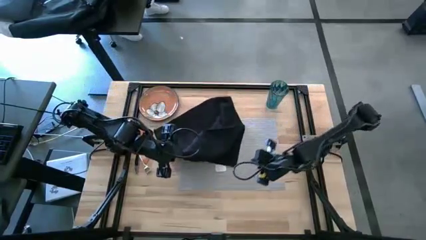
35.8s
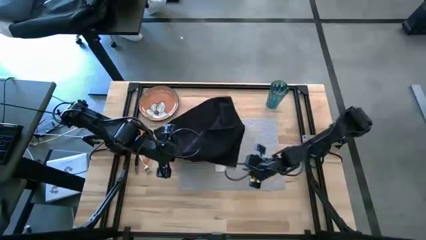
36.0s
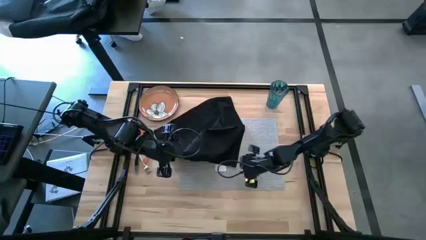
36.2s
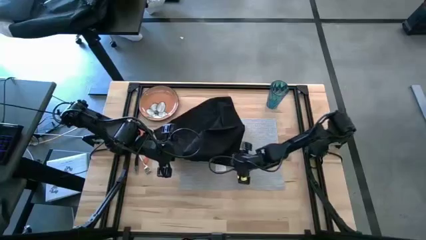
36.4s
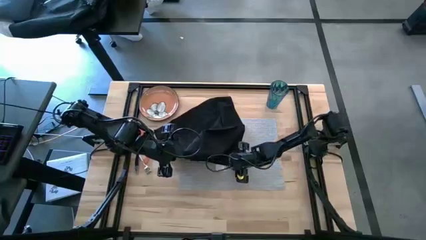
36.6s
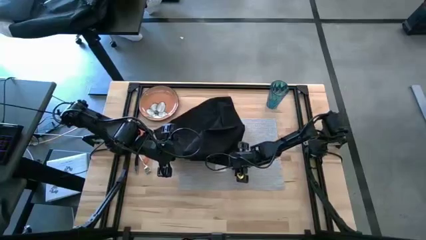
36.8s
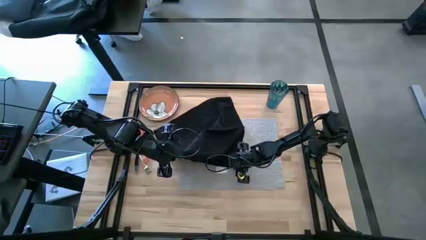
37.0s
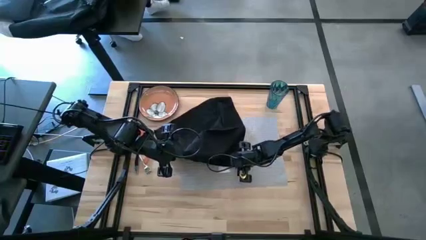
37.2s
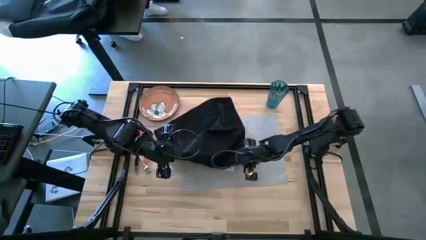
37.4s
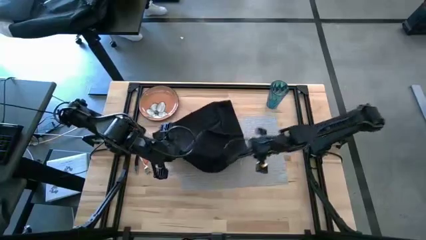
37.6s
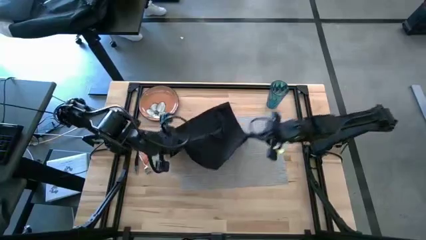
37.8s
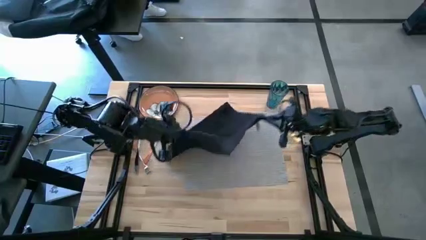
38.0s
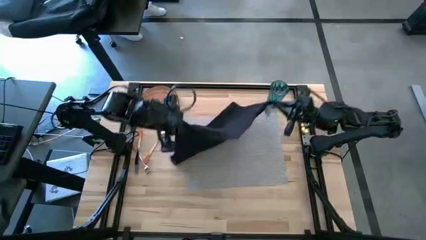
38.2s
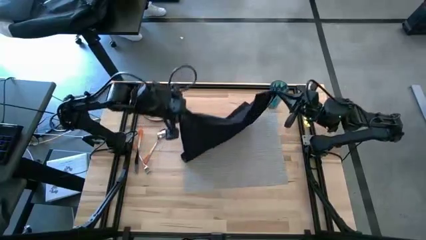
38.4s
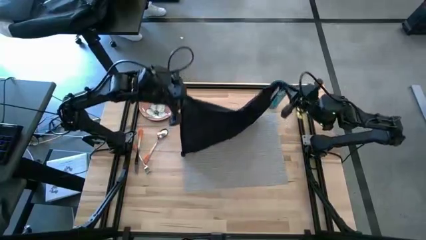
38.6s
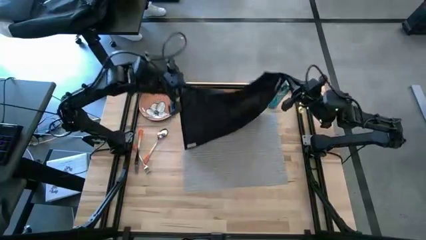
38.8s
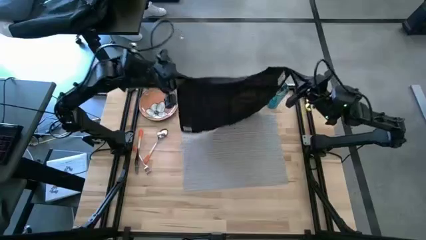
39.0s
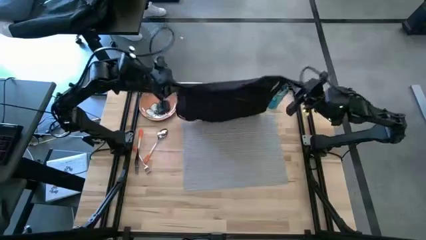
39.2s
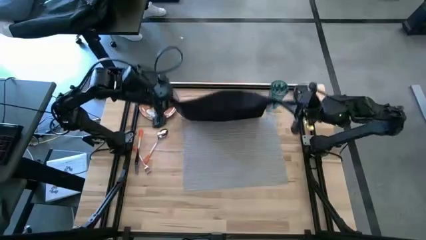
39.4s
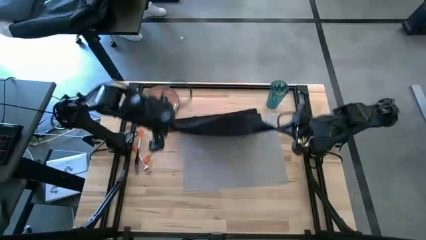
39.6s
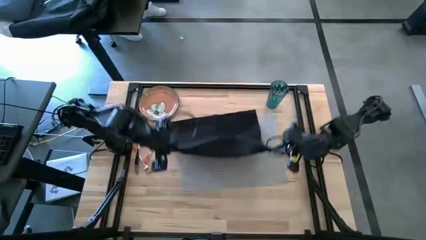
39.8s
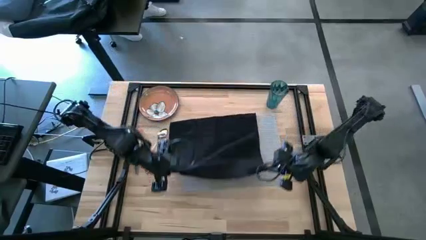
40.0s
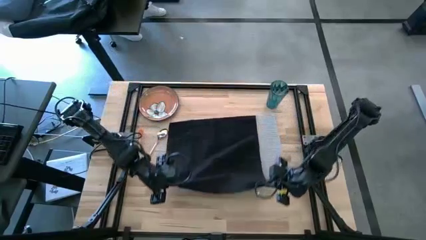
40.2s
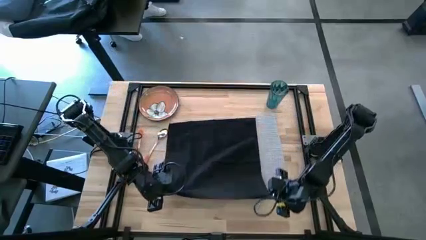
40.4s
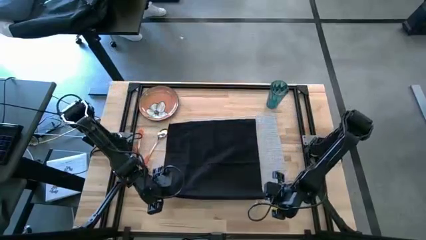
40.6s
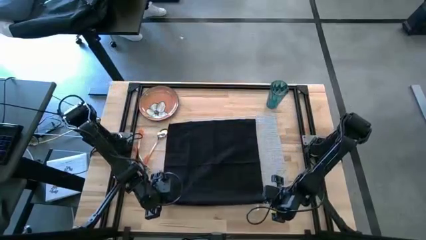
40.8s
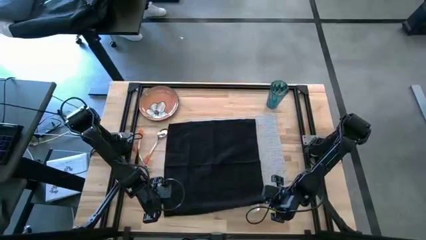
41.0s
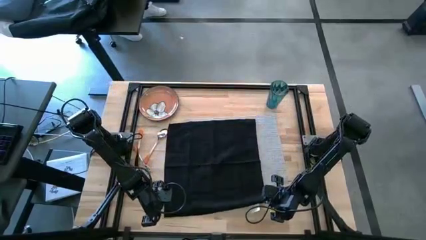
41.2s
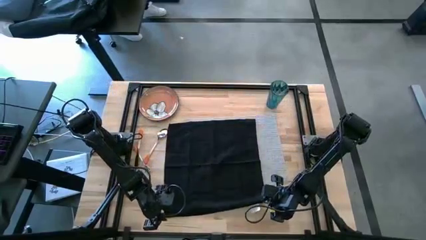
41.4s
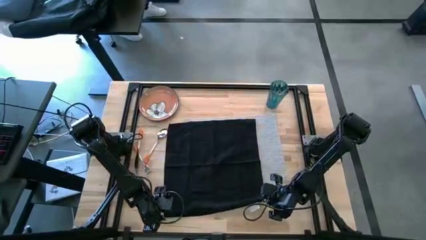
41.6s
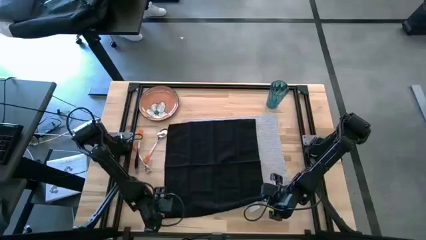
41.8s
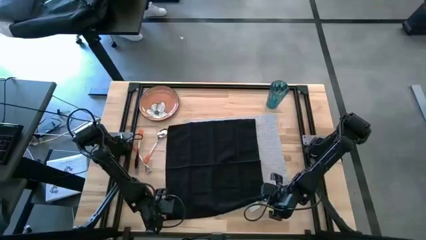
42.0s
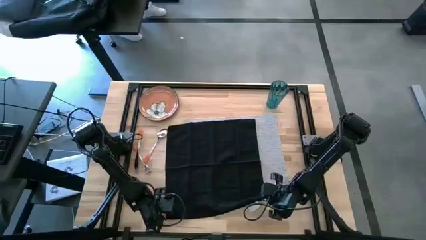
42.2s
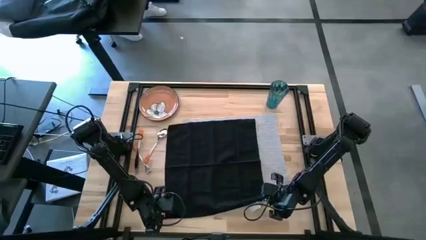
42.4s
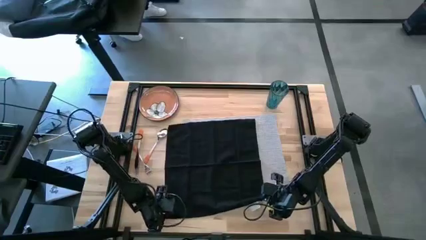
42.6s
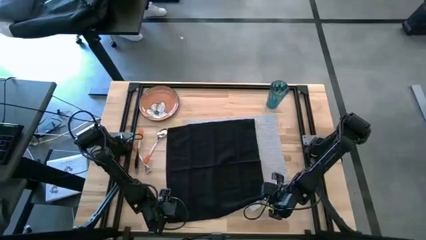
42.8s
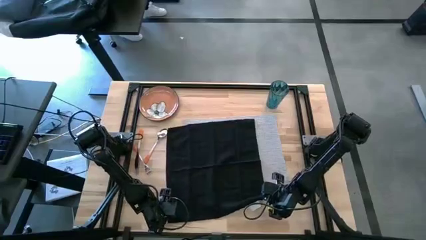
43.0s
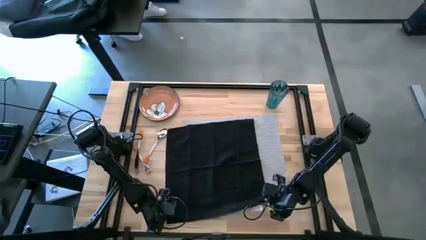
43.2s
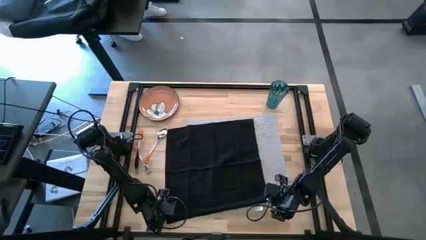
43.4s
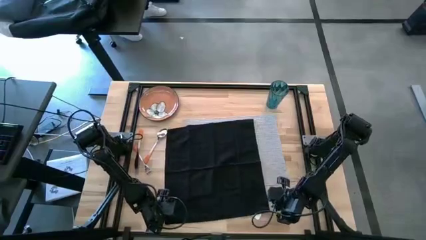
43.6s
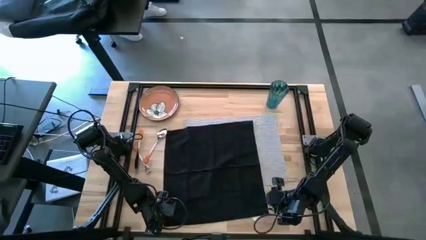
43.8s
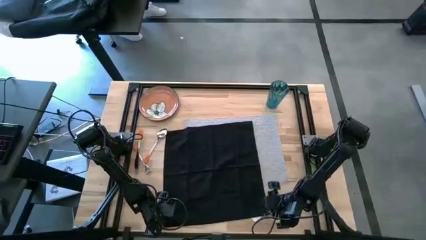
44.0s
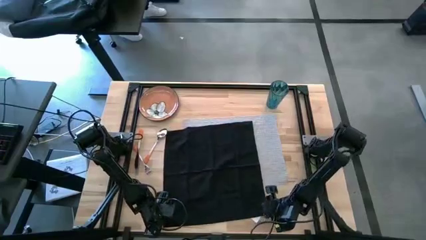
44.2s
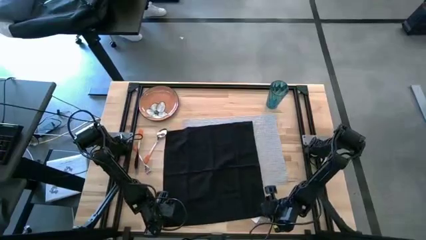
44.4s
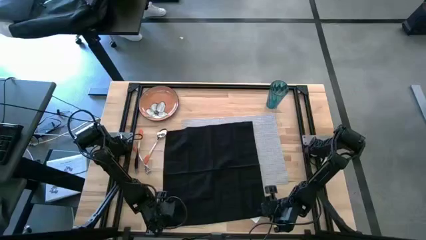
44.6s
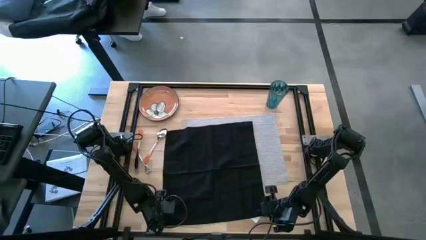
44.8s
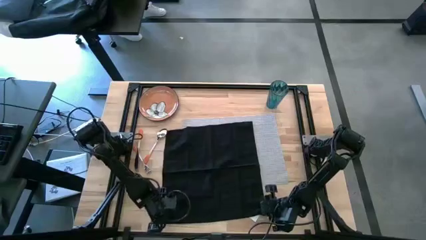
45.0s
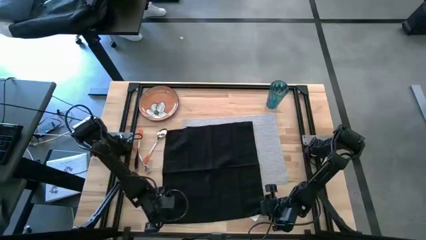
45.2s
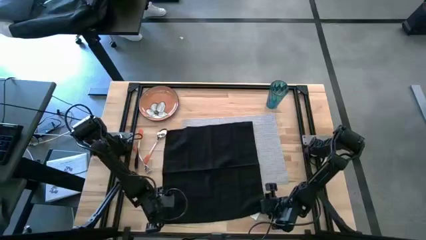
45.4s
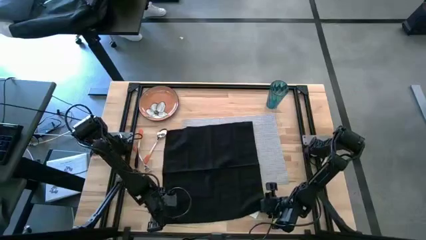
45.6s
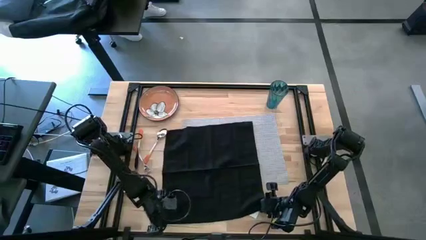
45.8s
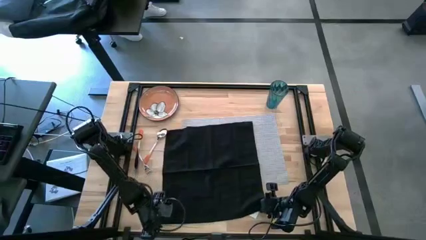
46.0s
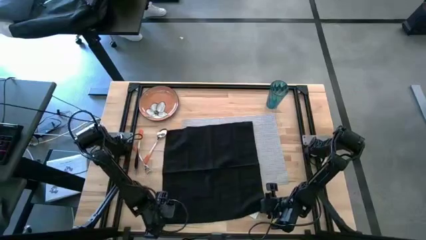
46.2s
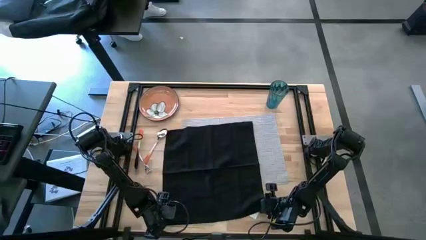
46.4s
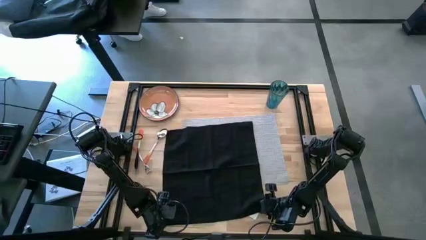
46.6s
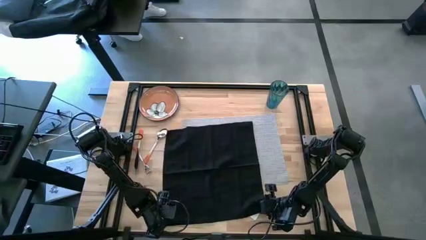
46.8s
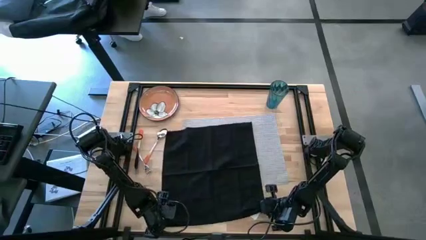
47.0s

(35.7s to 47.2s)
Task: Set table place
Fold the black table napkin

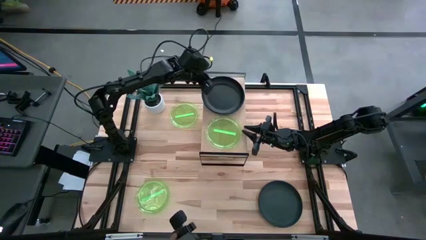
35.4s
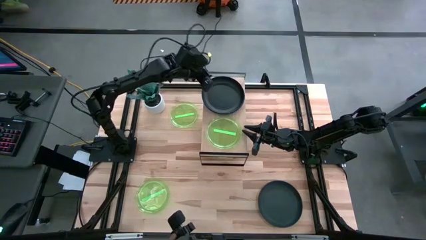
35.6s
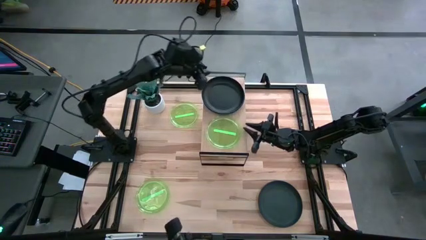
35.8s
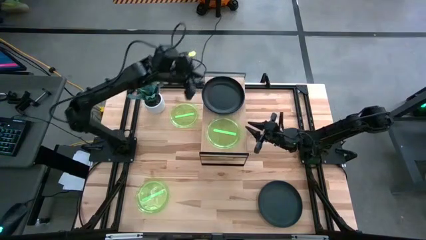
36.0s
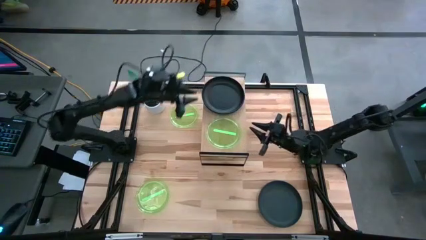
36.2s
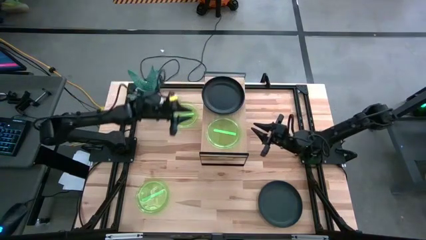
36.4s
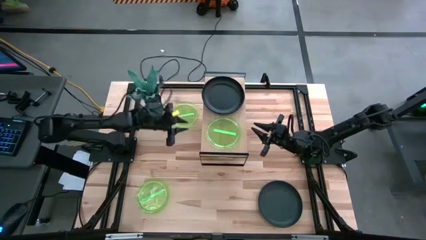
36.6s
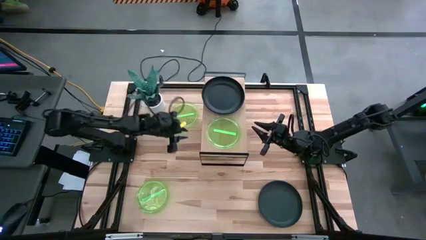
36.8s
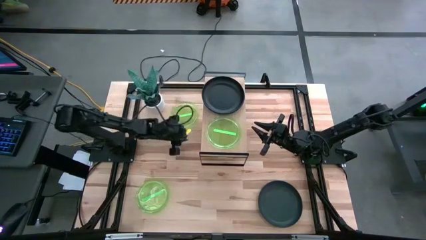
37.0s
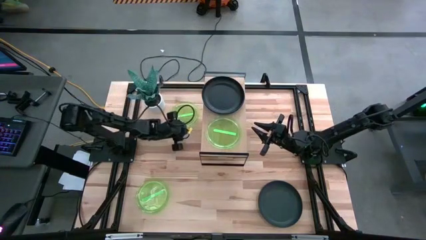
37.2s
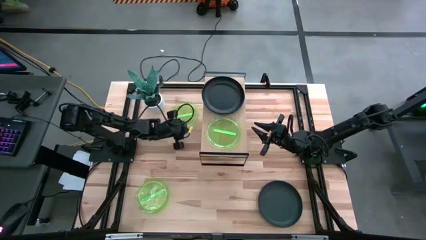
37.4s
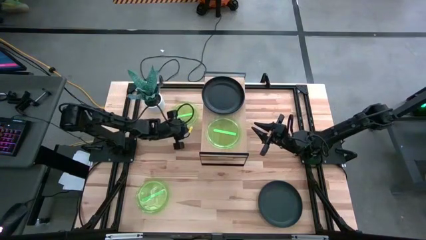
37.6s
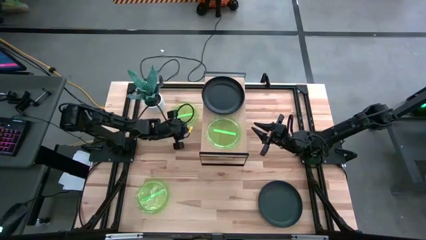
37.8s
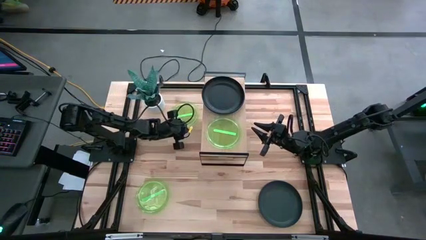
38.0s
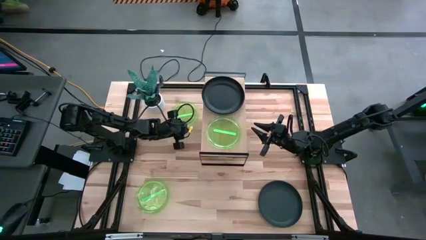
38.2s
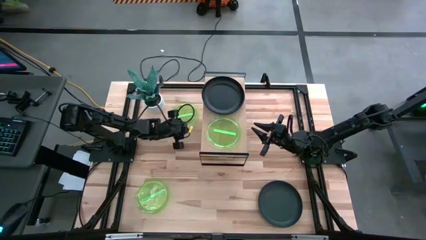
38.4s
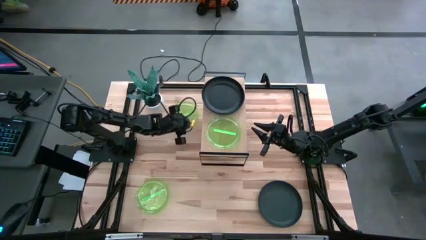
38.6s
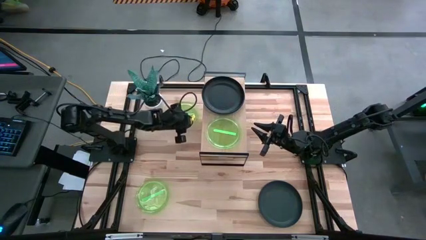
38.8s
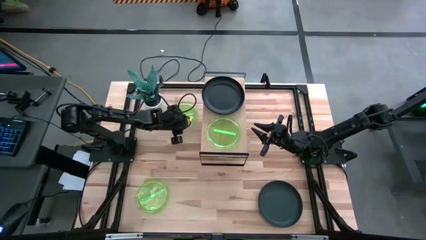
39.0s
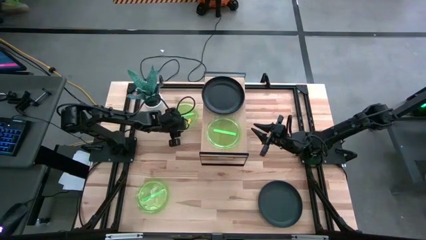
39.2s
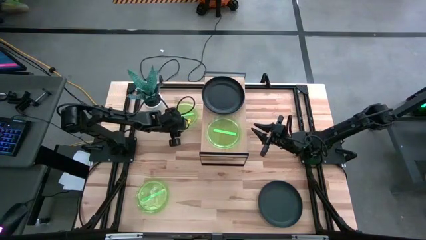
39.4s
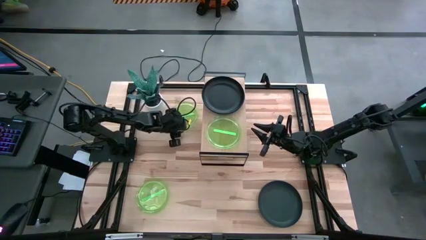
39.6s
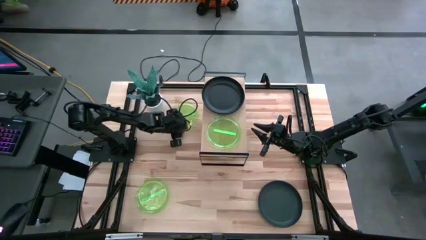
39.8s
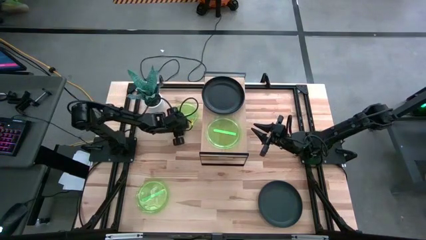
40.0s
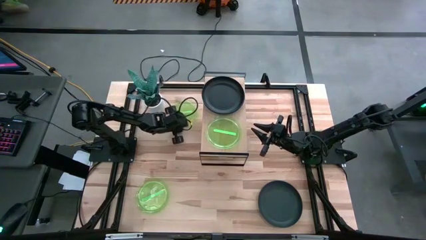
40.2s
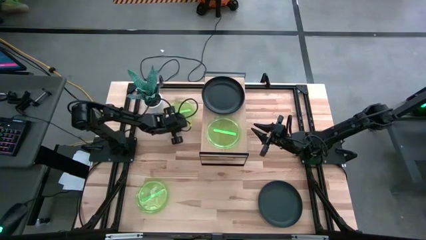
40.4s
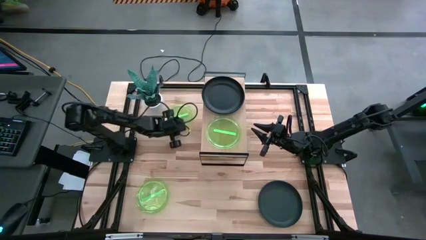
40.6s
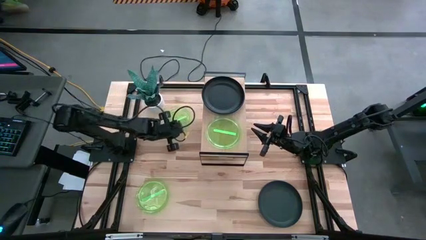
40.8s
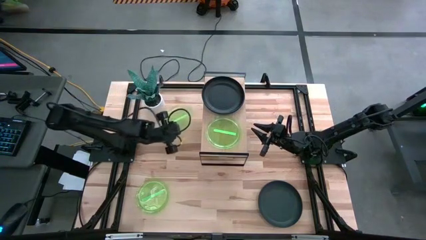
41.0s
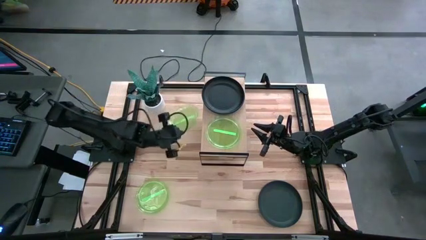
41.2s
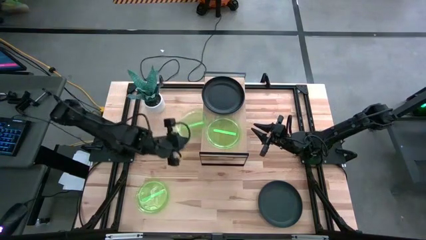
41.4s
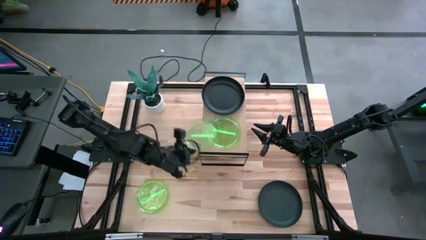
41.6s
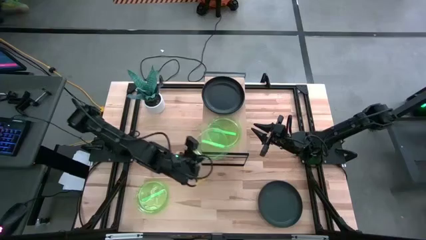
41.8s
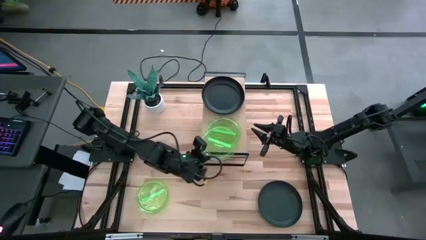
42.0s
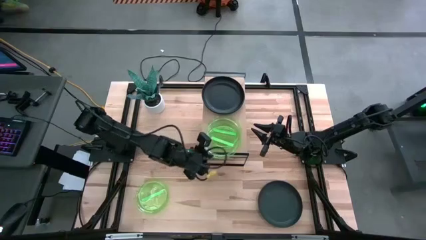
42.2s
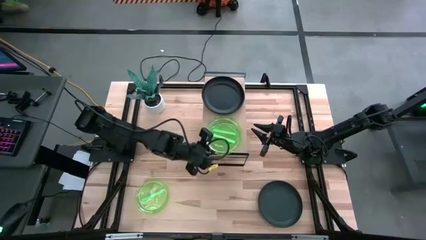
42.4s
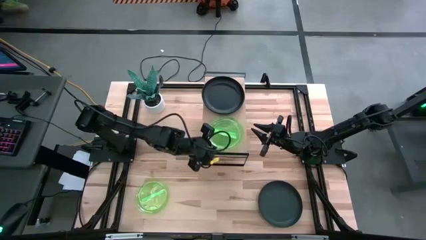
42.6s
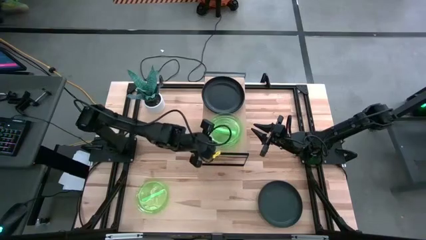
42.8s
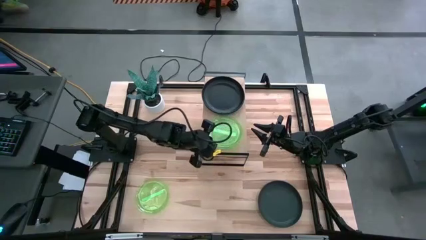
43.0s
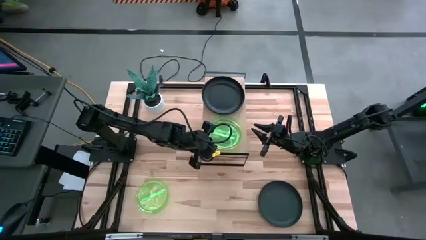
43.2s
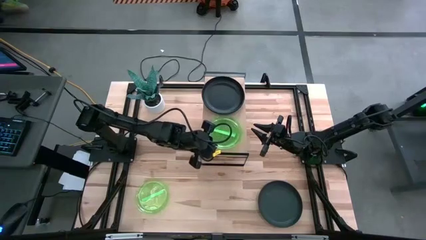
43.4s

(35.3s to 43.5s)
Task: Place and stack plates onto a shelf
Stack the top green plate on top of the green plate on the shelf
